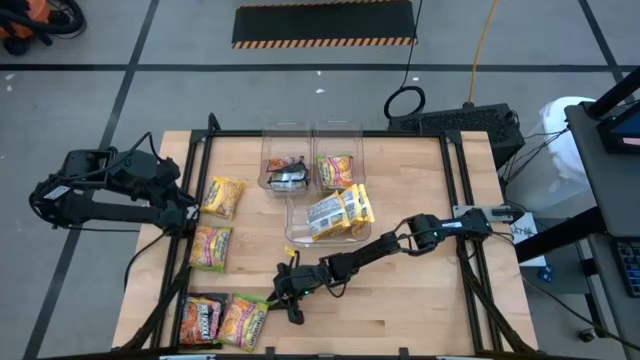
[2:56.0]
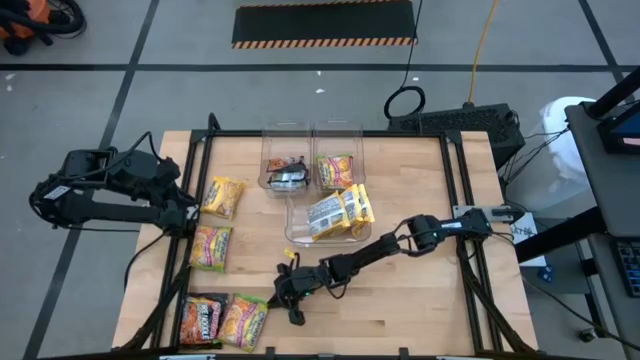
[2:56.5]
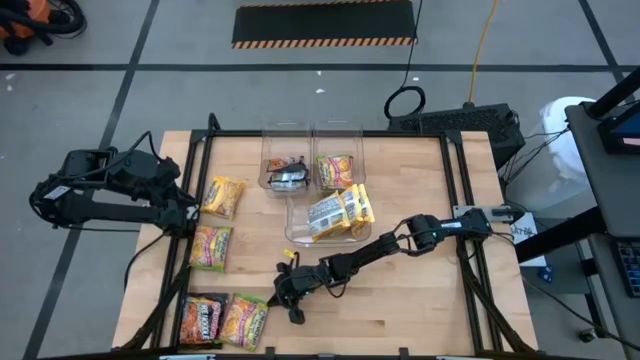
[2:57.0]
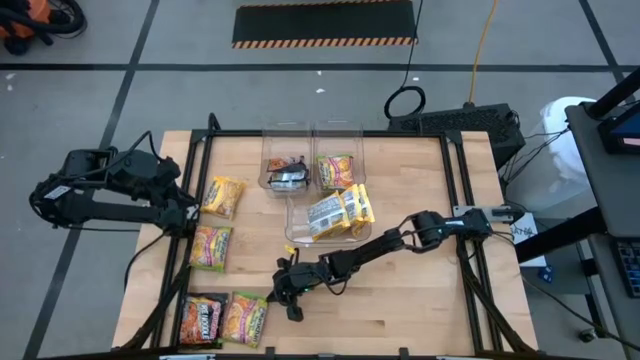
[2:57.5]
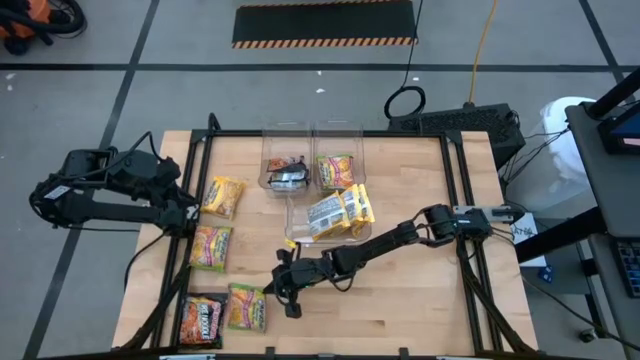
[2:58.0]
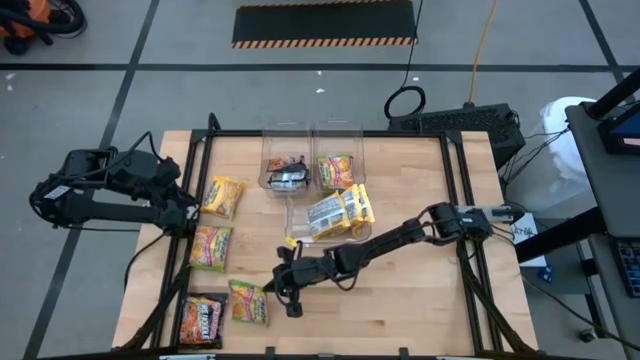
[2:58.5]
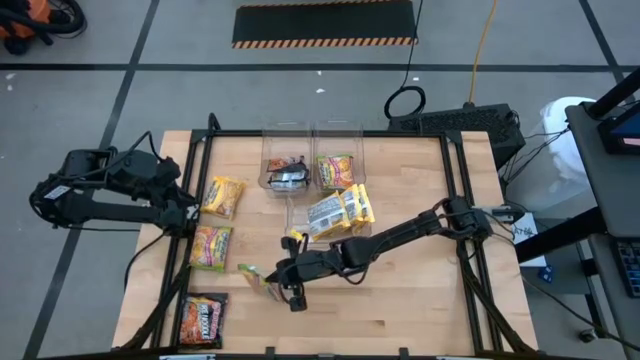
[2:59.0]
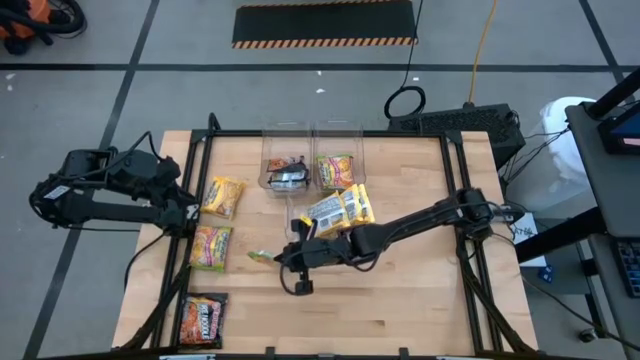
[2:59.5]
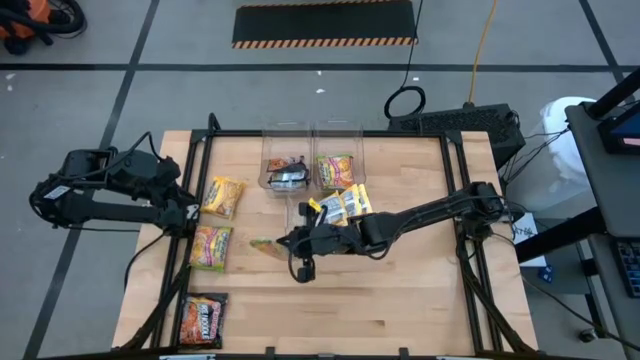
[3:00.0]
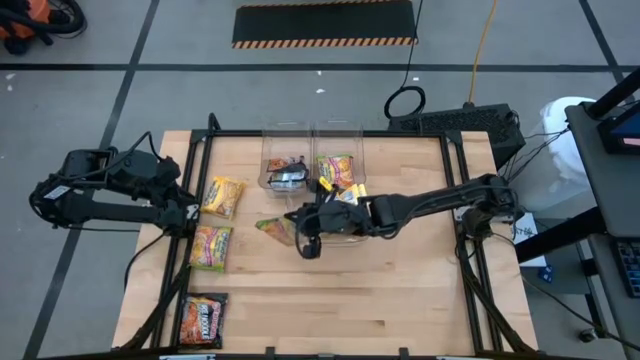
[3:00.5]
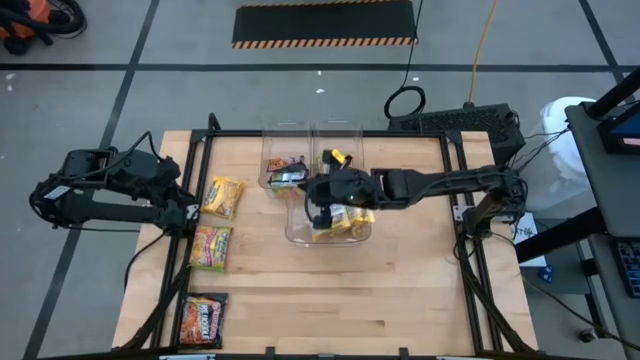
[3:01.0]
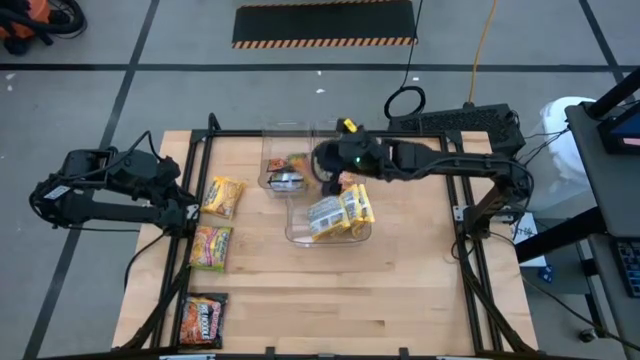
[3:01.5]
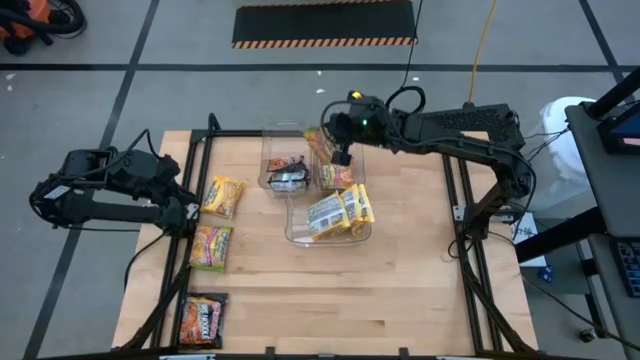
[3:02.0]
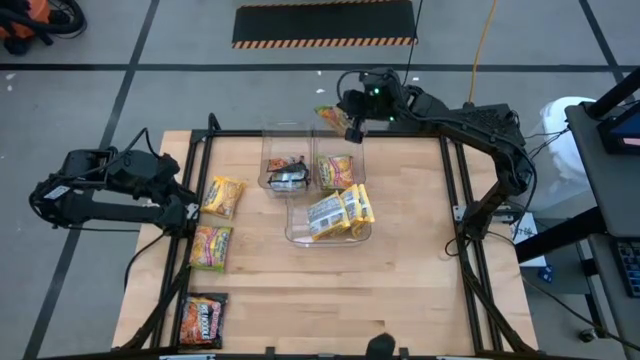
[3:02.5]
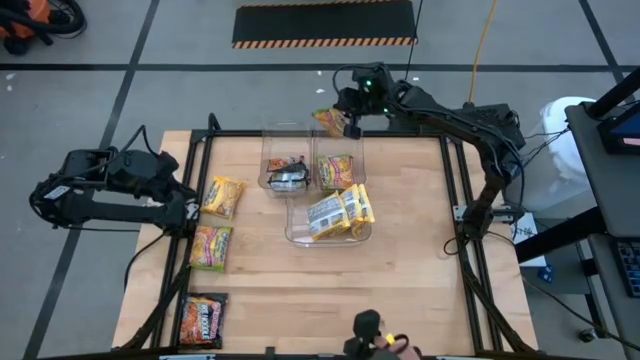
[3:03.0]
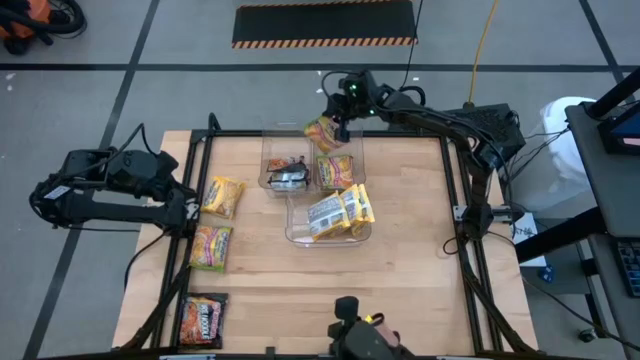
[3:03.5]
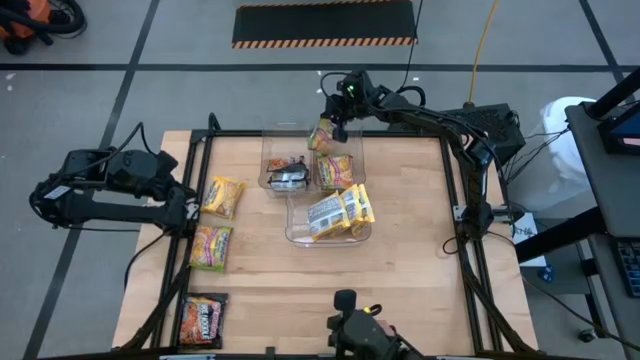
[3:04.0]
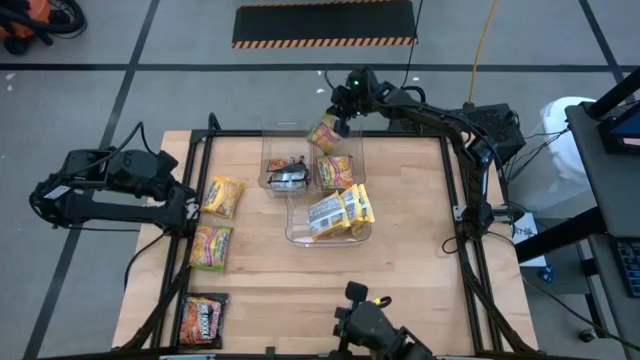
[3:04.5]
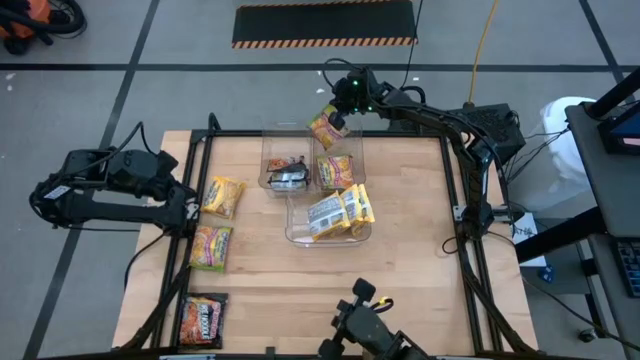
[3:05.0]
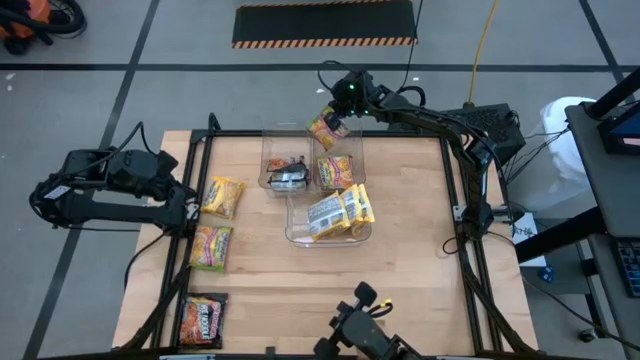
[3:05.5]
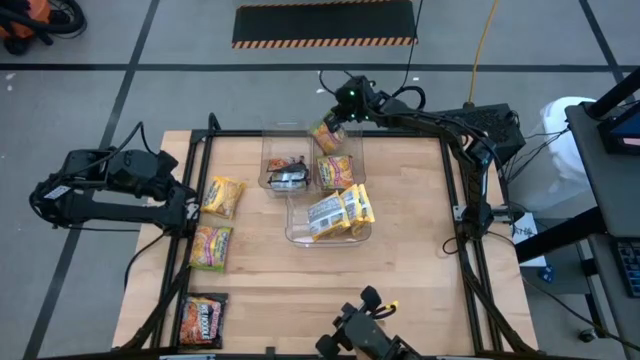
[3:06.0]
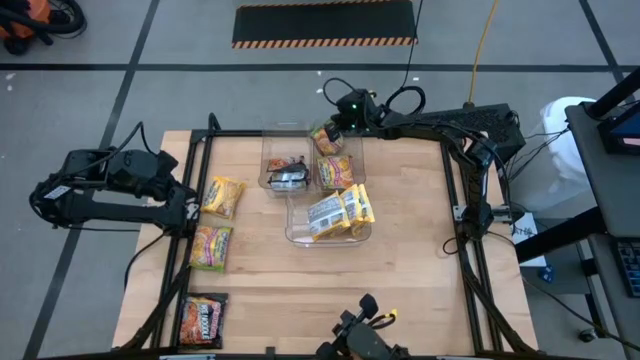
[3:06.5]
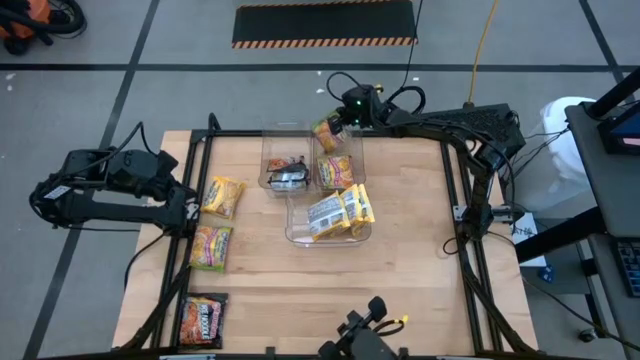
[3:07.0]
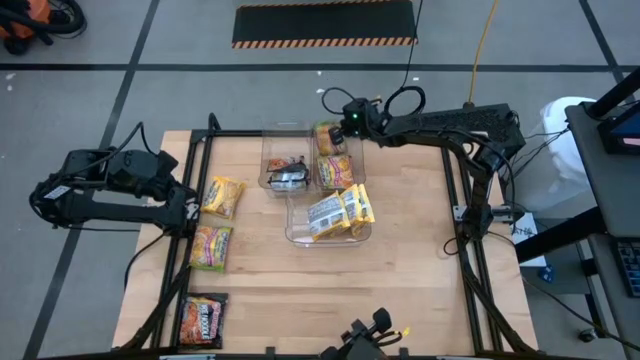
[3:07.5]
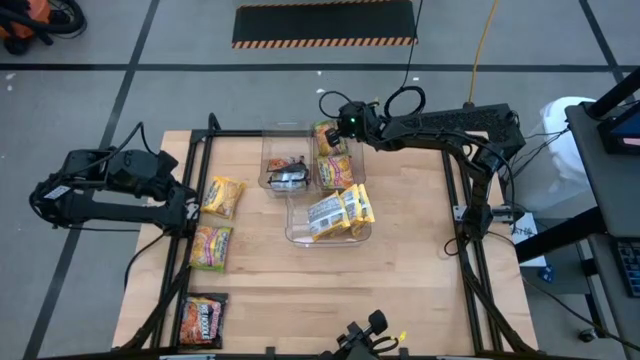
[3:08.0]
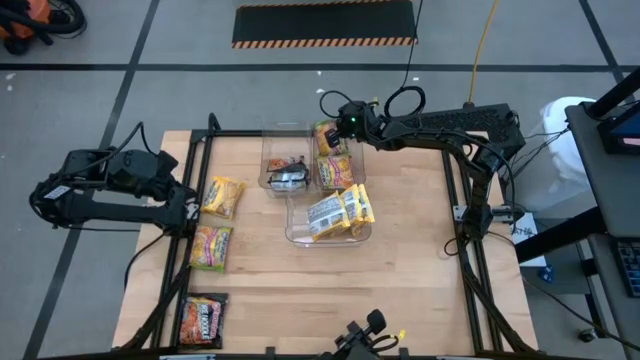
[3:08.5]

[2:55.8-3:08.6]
Task: Sort Maruchan noodles
Put the green noodle pack into the top right transparent bin

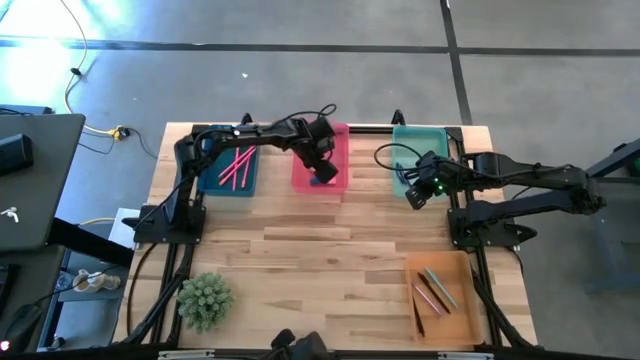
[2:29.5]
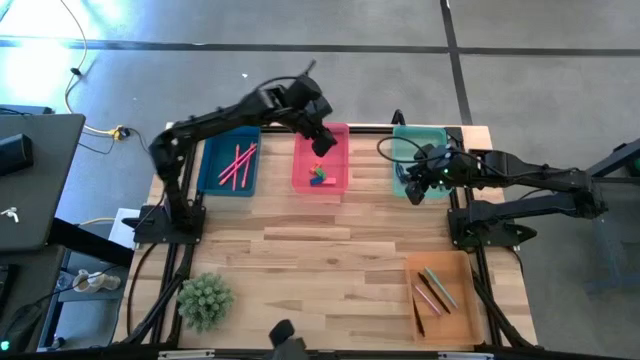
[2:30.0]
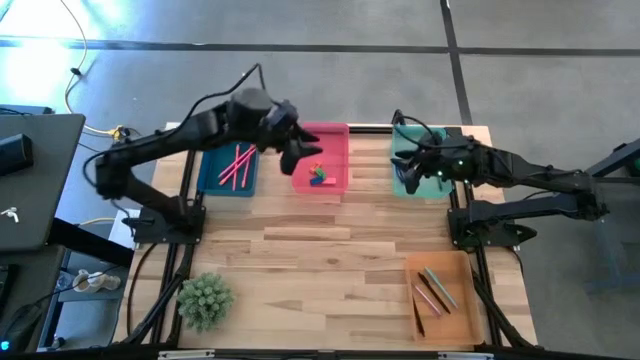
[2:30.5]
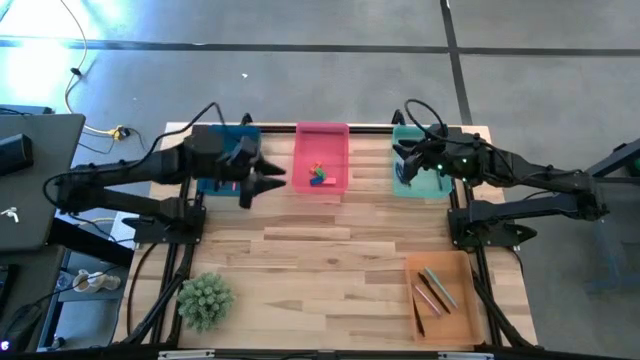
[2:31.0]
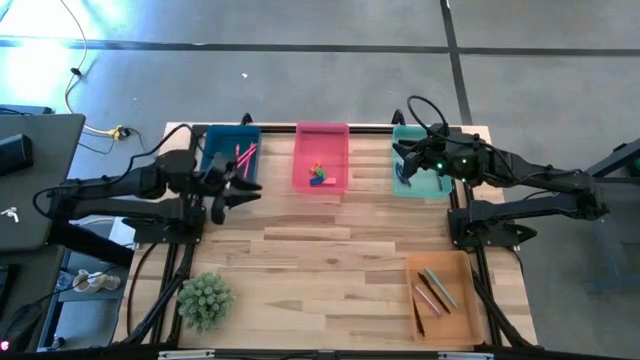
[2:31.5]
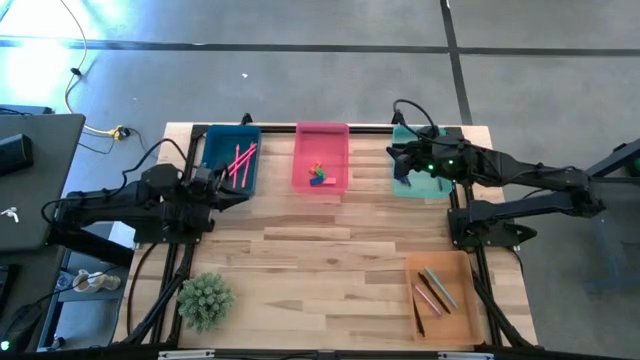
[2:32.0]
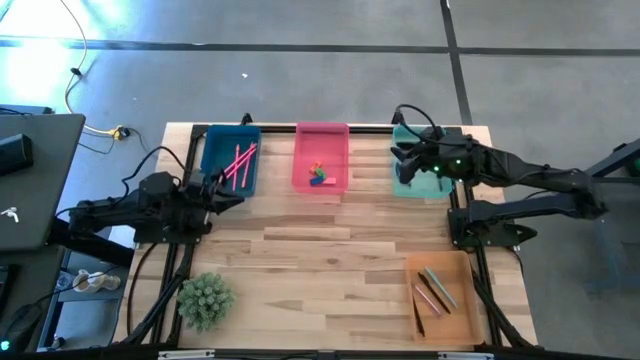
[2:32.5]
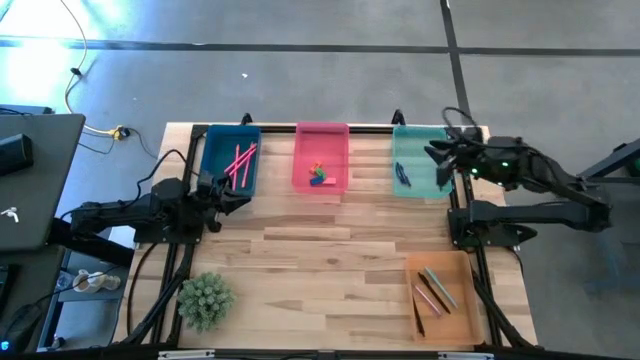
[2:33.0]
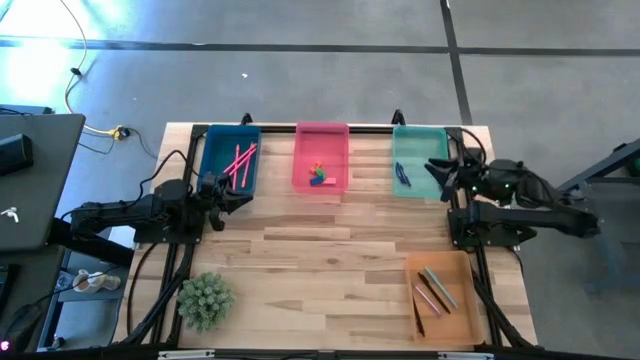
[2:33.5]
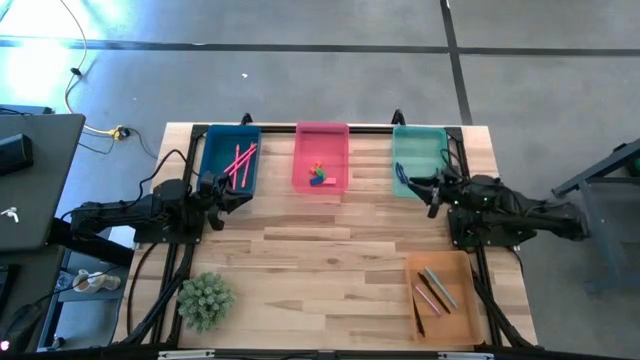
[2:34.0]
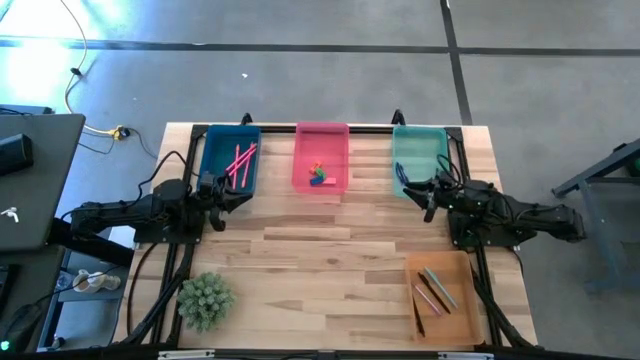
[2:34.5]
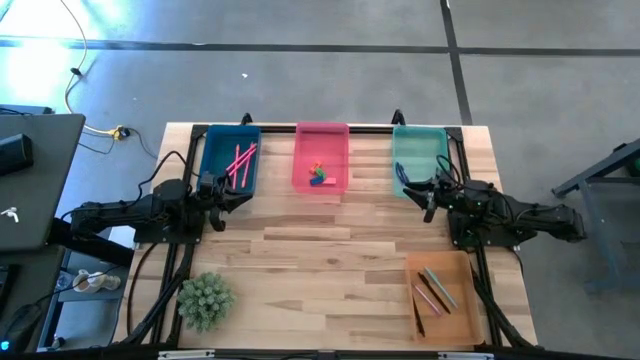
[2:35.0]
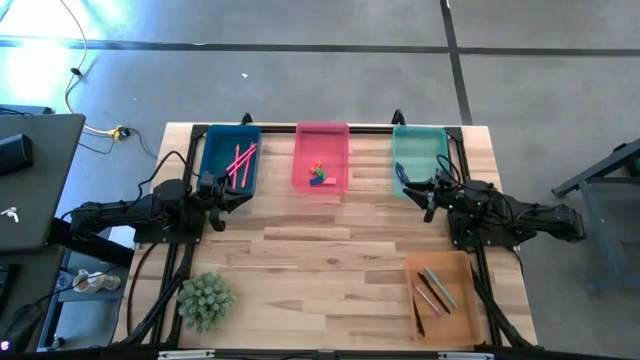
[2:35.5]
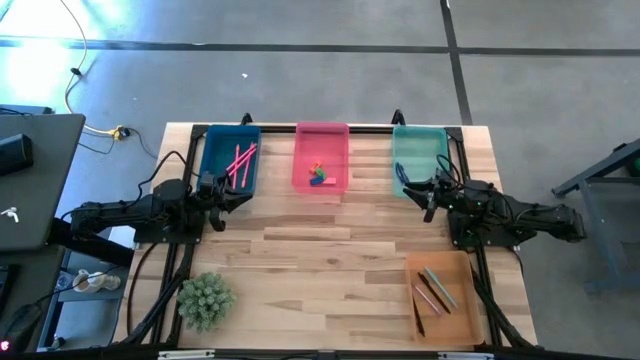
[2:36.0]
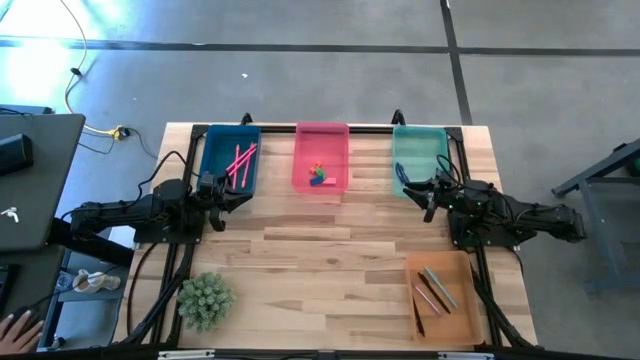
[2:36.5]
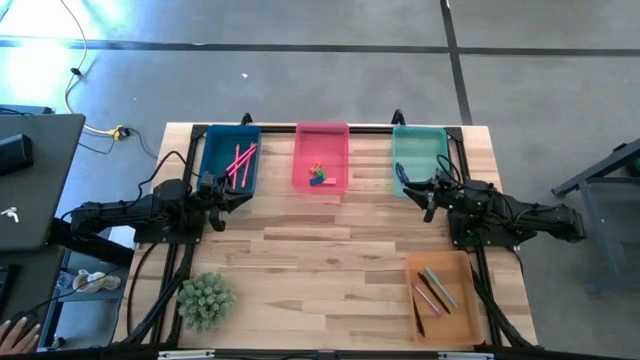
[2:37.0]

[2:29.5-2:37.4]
Task: Sort crayons/erasers/pens/pencils in bins
Return to Home Position
